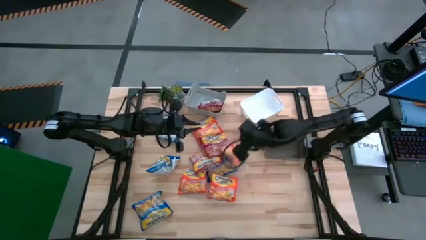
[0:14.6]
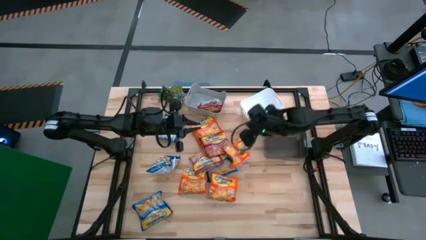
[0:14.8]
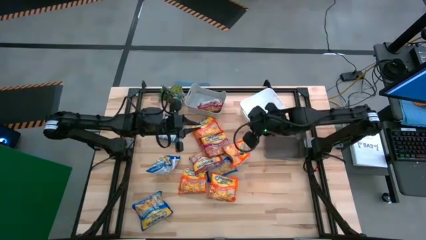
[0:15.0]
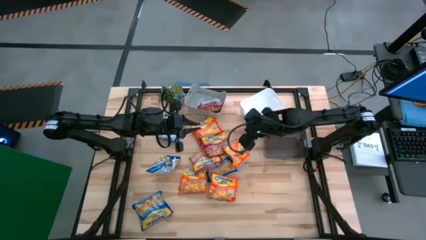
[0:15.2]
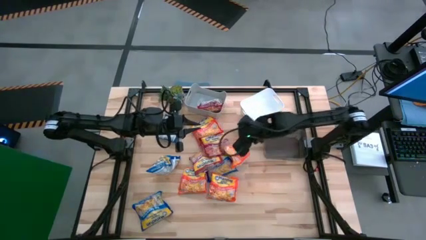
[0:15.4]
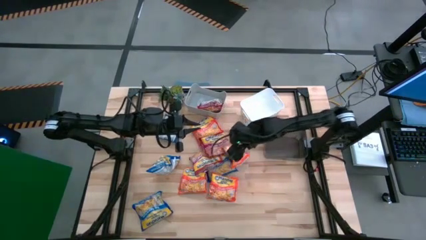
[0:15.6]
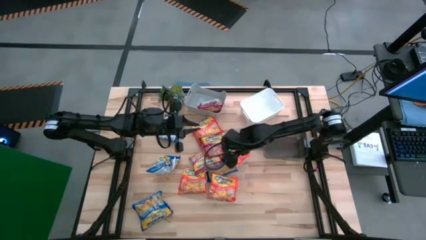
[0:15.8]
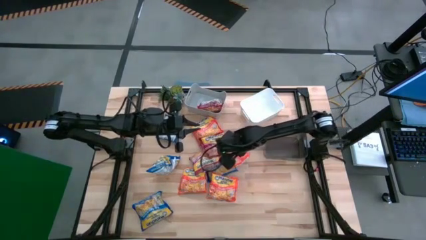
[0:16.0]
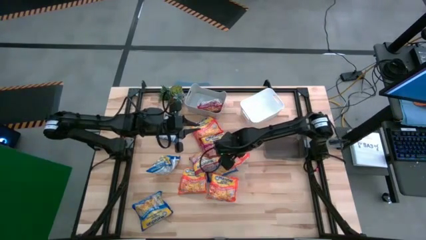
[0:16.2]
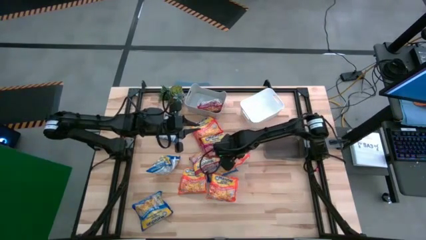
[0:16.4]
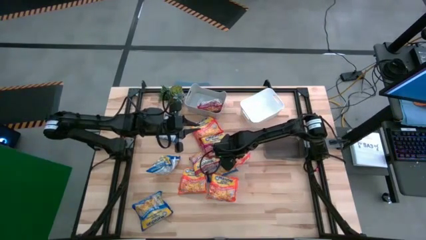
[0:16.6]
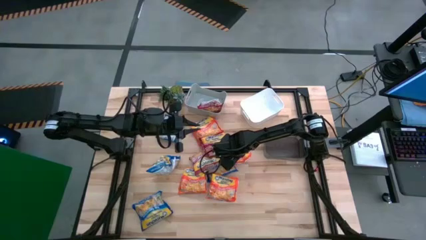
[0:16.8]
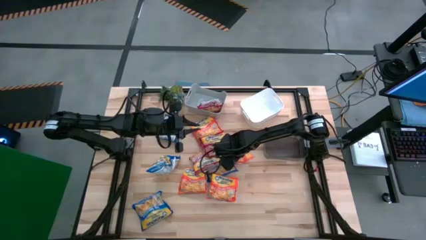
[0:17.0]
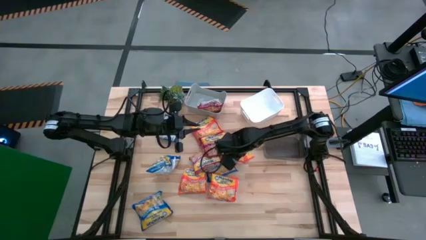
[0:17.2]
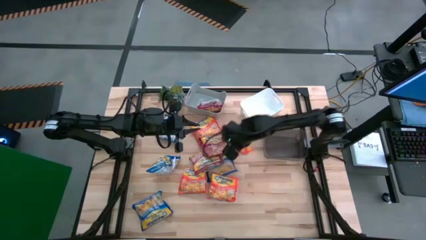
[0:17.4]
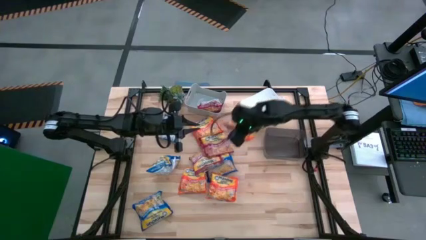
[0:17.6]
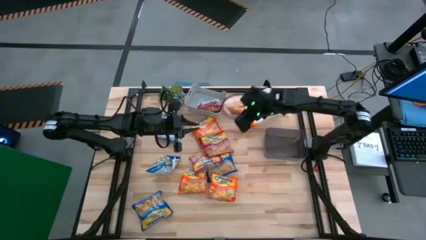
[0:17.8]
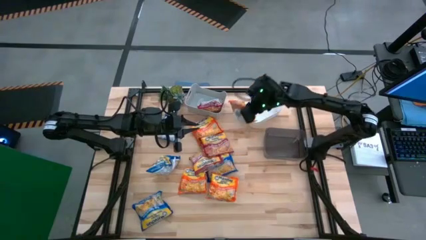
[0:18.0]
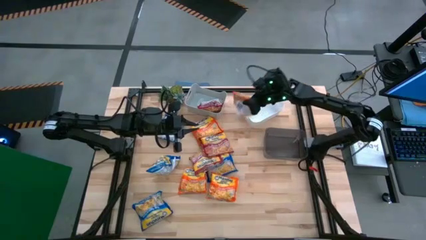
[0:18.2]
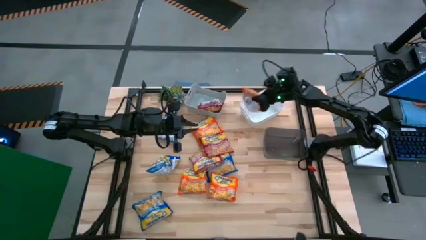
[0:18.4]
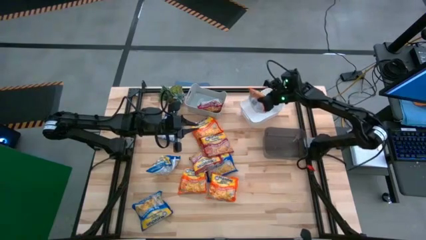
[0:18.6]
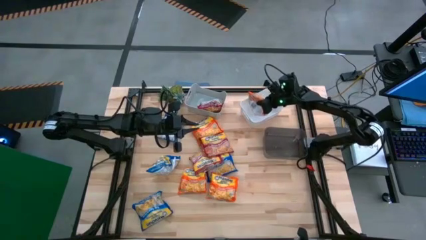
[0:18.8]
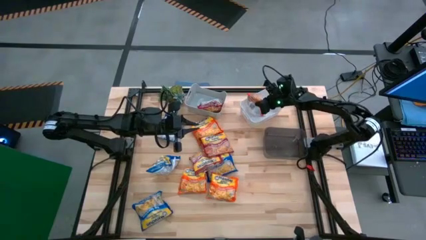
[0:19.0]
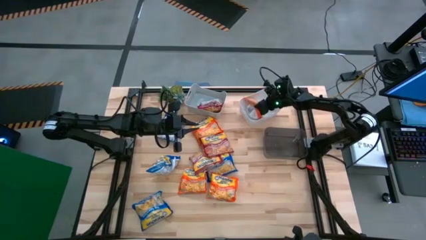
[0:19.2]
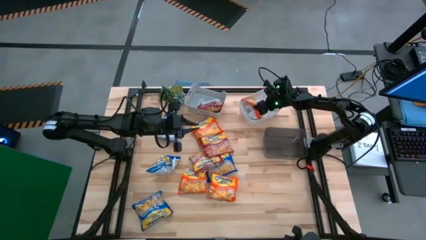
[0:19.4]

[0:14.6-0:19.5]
Task: Sort Maruchan noodles
Put the orange noodle pack into the white bin

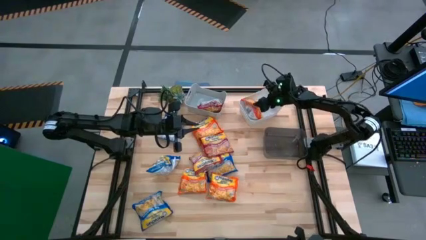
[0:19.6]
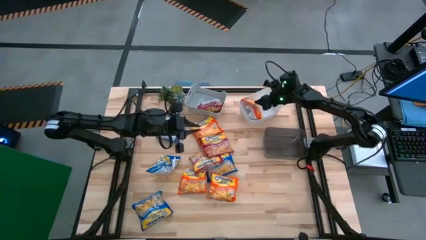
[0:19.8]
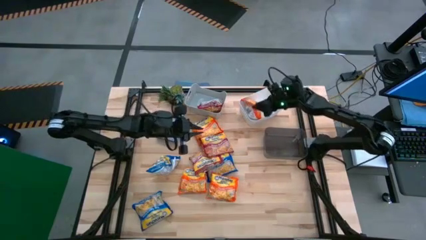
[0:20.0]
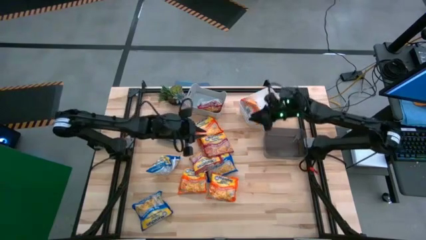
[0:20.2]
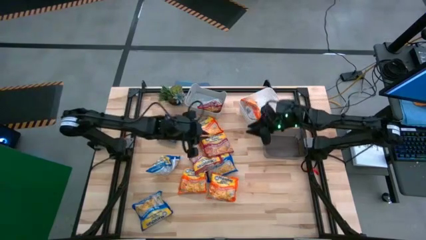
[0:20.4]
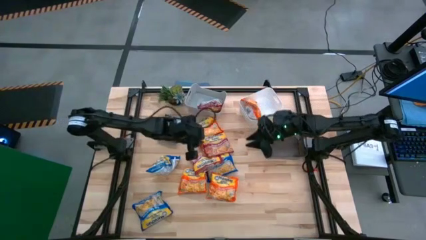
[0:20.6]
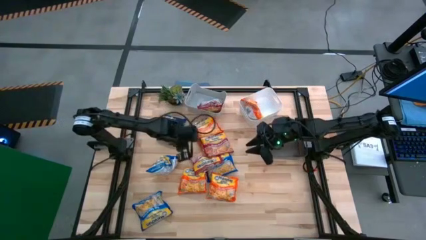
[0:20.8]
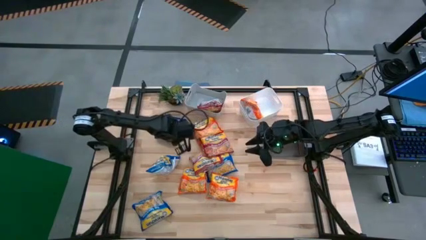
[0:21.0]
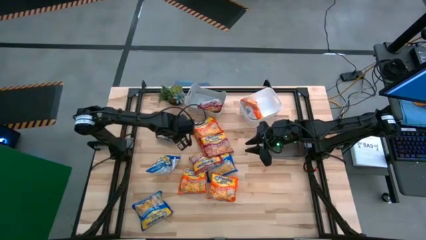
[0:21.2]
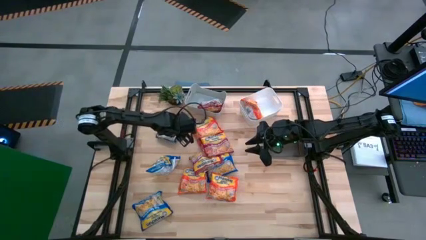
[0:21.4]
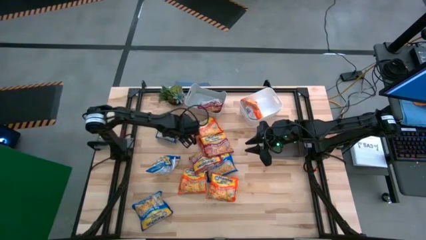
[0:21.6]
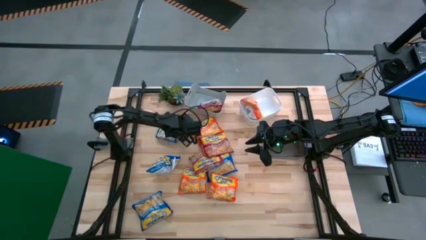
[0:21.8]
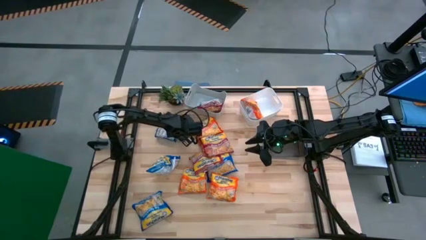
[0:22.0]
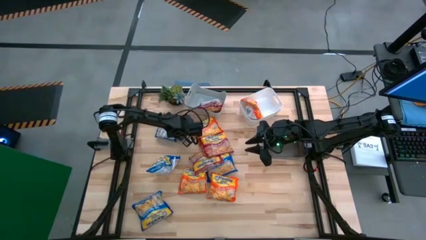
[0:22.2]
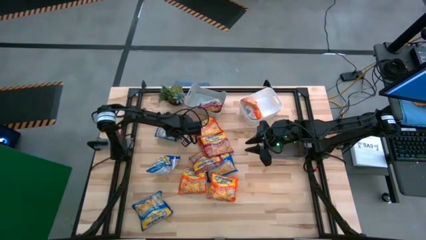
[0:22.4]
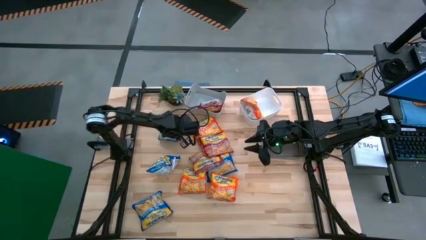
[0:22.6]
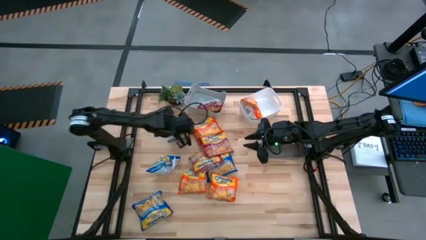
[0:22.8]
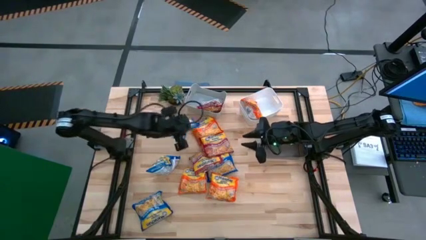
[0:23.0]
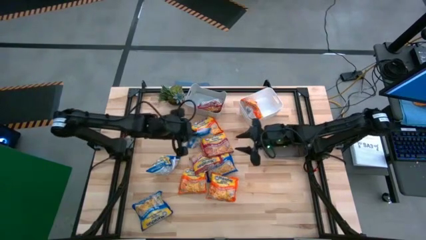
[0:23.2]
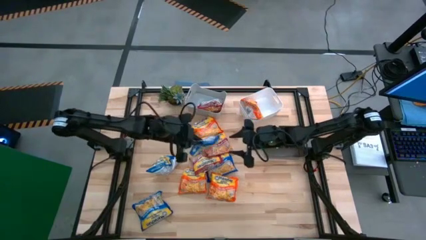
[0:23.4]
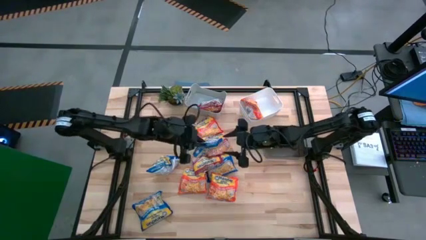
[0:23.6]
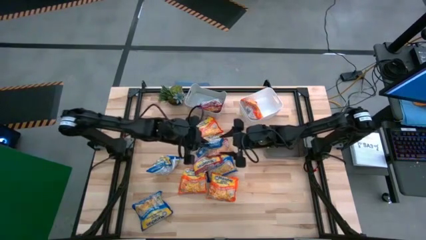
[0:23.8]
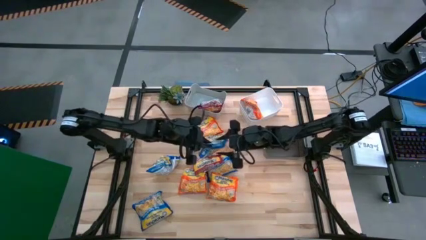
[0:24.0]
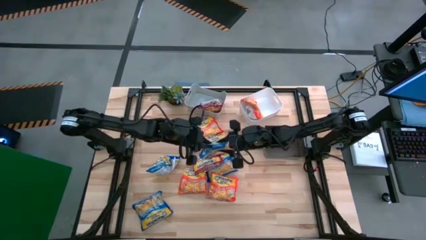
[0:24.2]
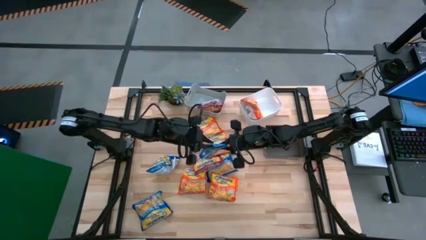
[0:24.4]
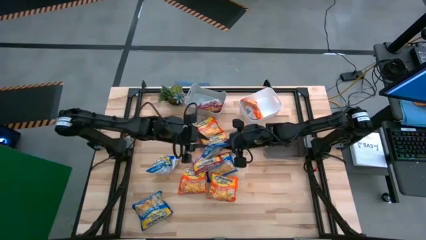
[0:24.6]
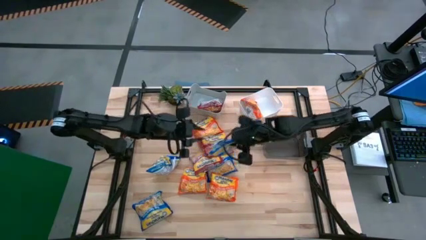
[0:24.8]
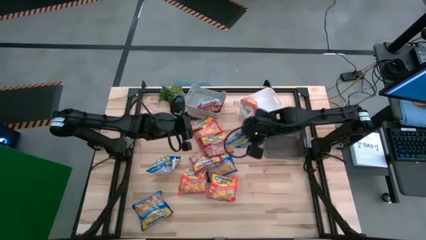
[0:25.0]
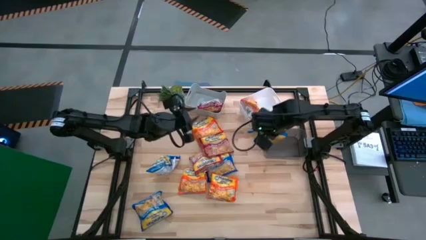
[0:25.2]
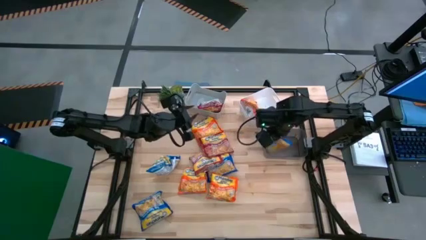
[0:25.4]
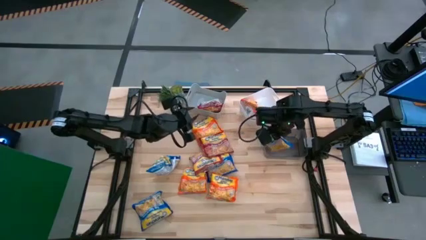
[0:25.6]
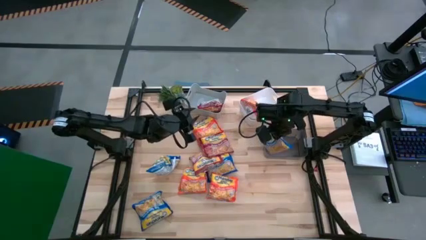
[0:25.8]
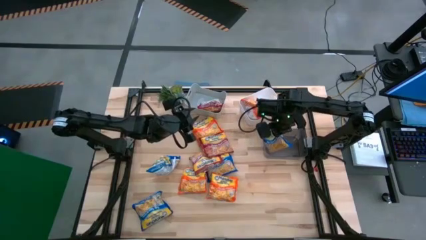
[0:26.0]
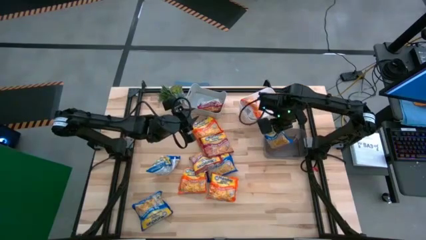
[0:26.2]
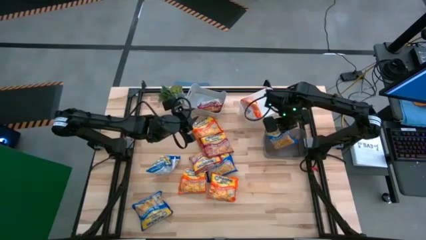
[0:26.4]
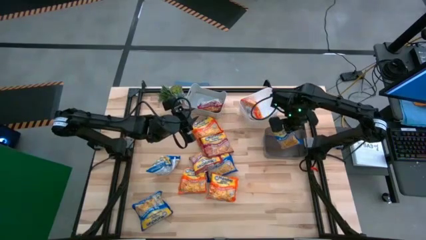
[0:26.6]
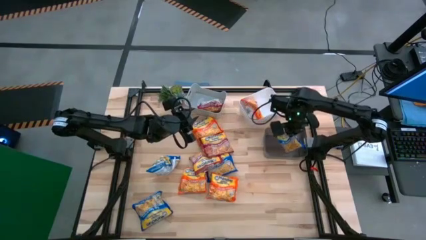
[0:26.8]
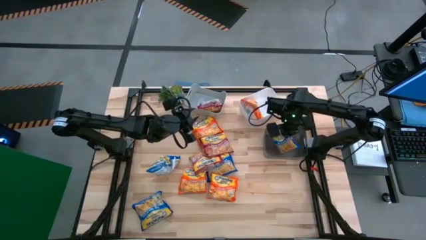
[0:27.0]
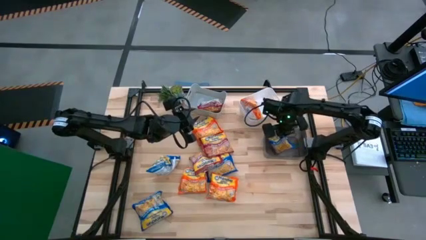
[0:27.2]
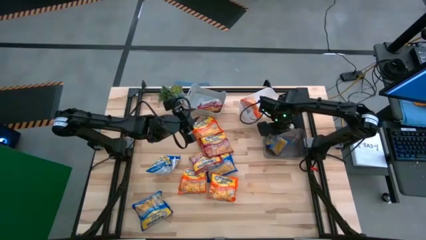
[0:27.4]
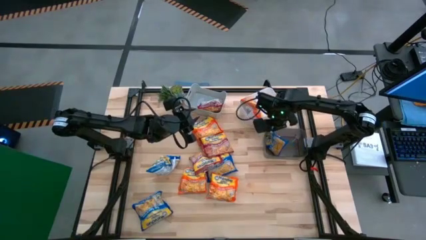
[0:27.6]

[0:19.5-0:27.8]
Put the blue noodle pack into the black bin

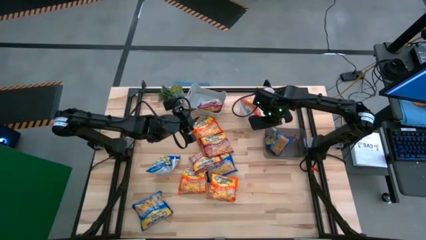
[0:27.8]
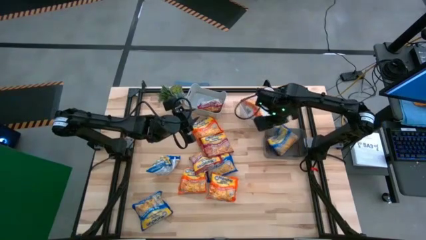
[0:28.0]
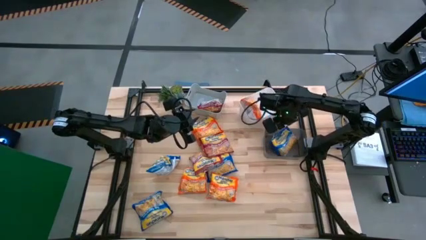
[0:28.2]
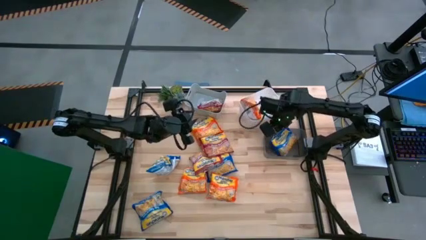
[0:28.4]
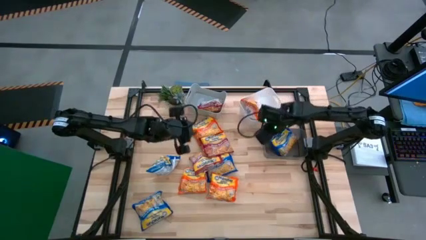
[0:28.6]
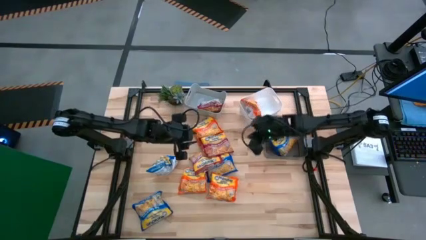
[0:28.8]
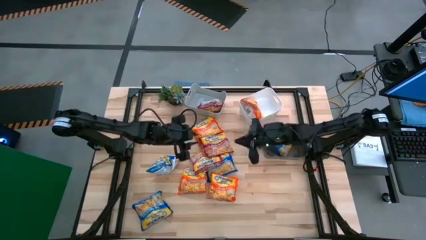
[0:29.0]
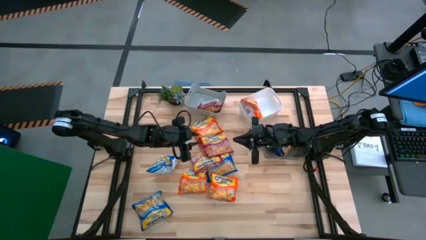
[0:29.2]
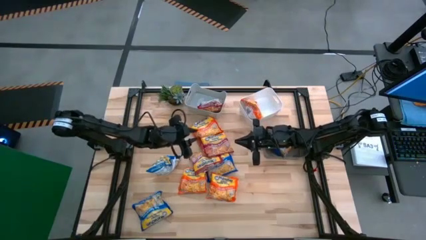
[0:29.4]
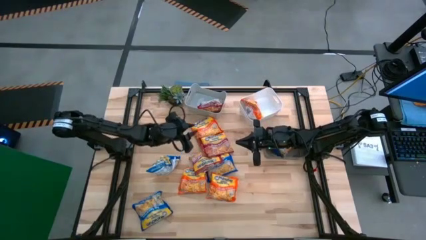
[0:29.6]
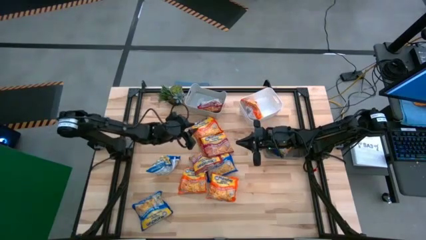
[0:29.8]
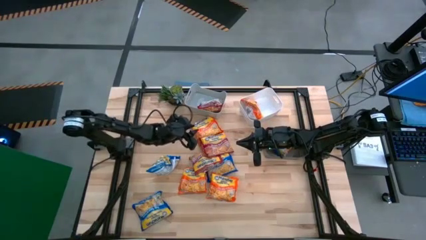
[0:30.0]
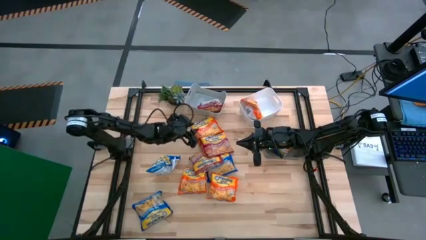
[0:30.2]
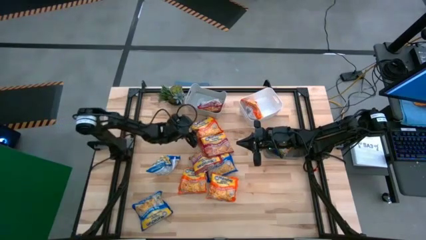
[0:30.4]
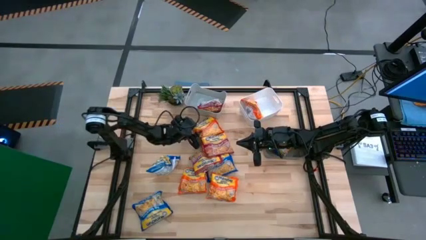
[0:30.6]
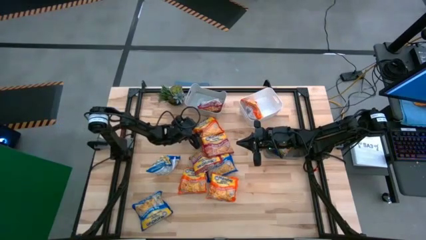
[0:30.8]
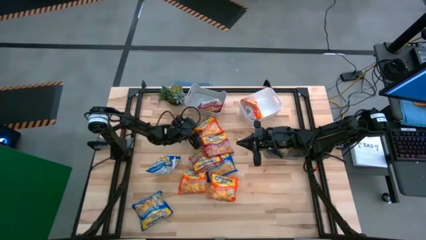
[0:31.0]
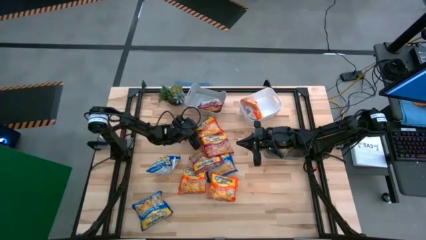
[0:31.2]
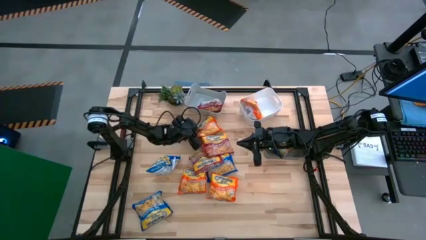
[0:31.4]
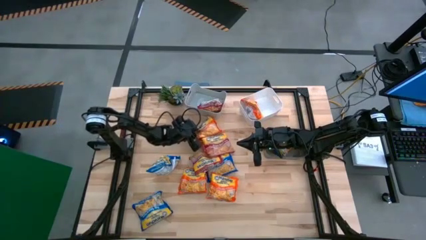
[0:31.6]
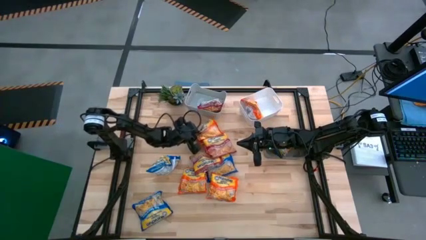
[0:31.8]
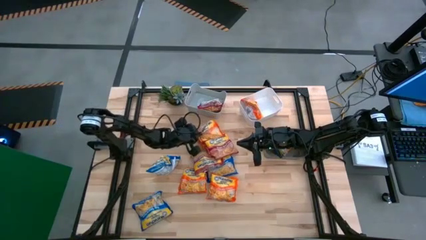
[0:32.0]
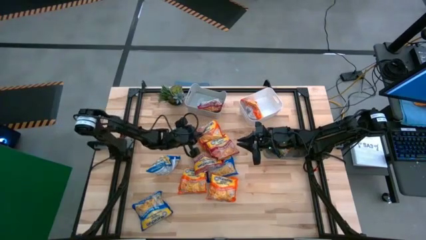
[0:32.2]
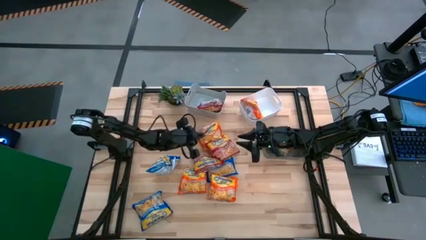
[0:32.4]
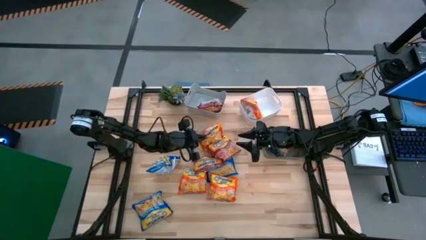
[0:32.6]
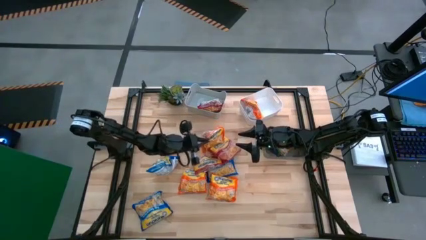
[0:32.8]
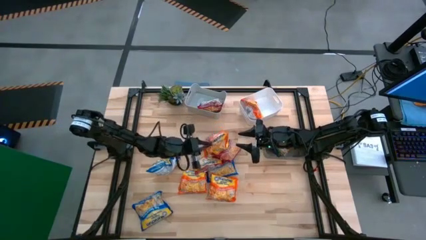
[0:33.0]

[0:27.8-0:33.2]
Put the orange noodle pack into the white bin
